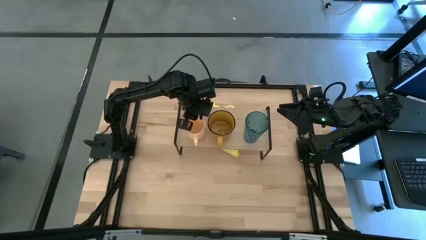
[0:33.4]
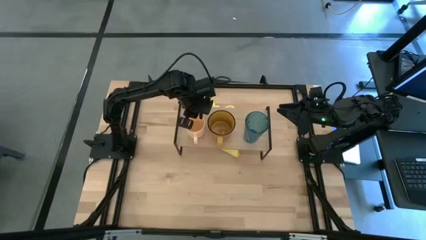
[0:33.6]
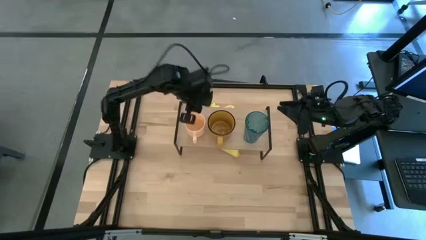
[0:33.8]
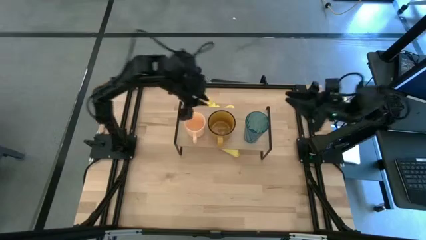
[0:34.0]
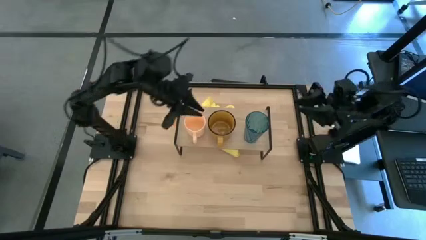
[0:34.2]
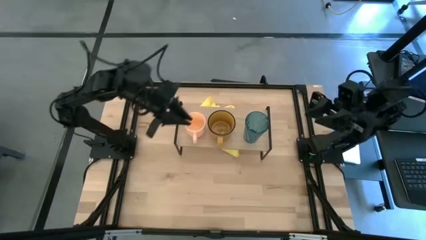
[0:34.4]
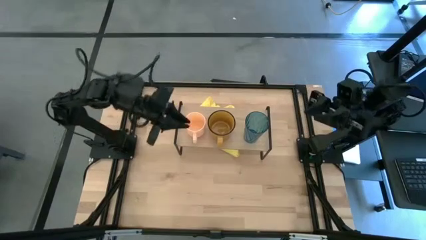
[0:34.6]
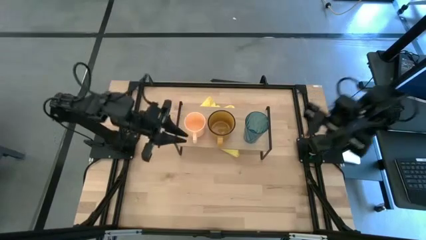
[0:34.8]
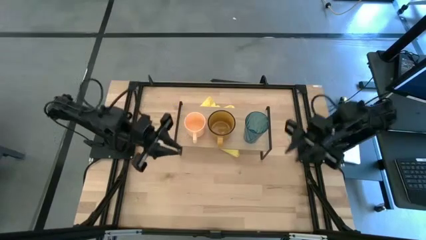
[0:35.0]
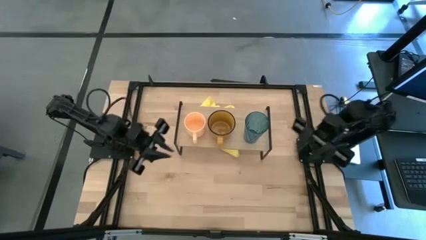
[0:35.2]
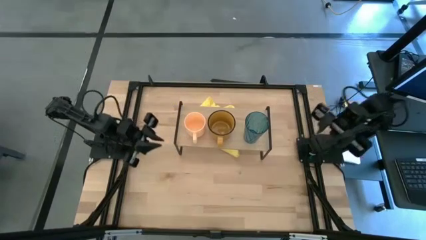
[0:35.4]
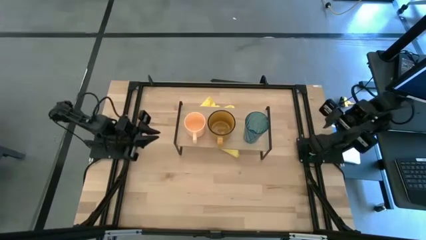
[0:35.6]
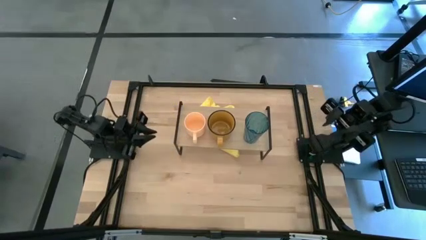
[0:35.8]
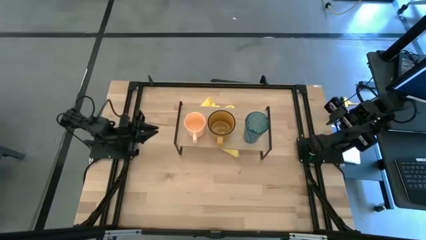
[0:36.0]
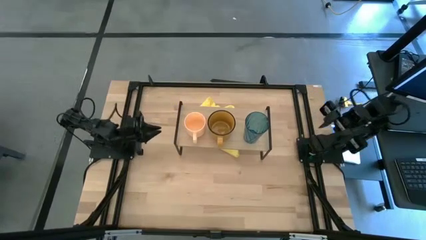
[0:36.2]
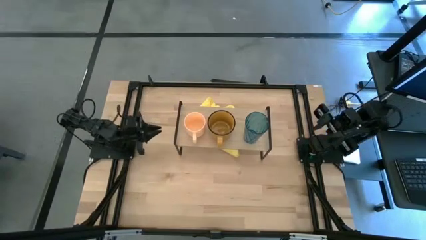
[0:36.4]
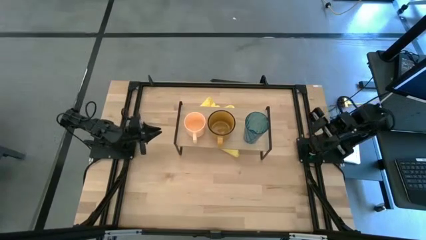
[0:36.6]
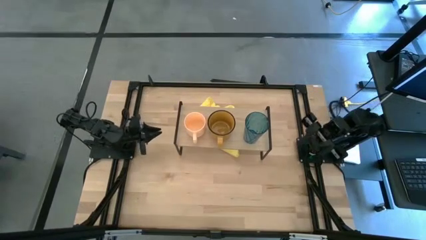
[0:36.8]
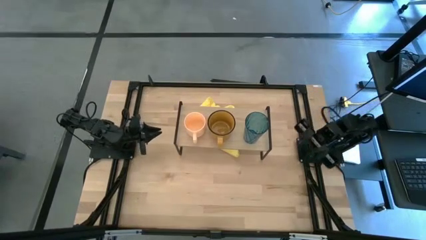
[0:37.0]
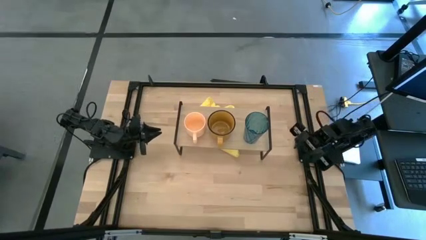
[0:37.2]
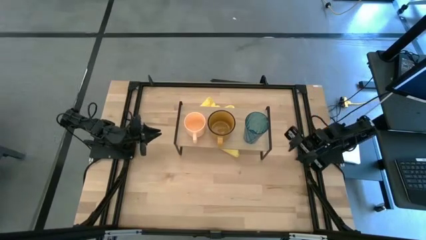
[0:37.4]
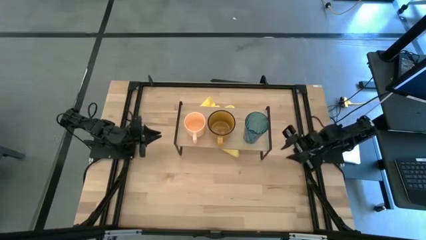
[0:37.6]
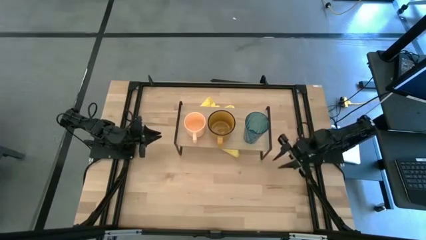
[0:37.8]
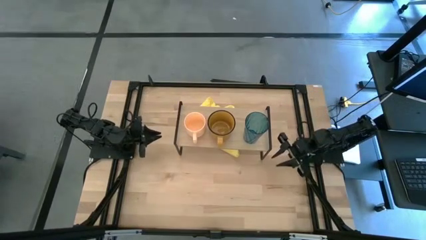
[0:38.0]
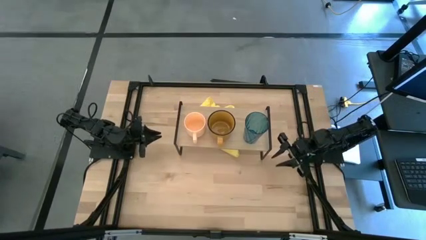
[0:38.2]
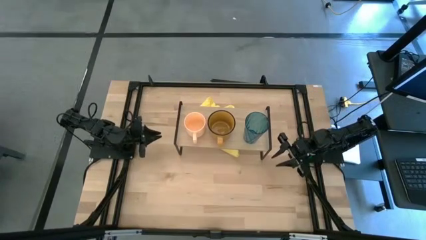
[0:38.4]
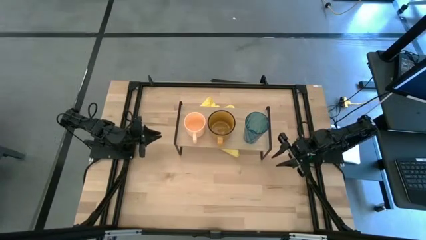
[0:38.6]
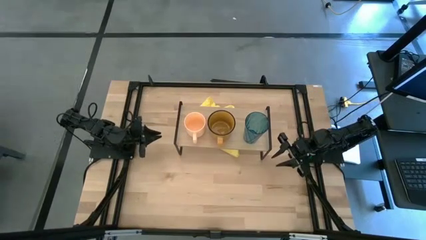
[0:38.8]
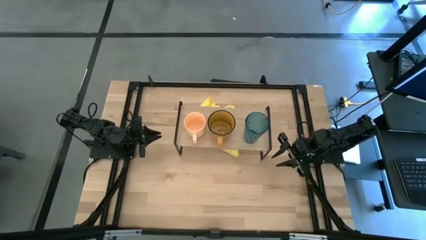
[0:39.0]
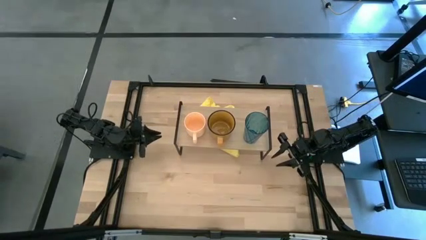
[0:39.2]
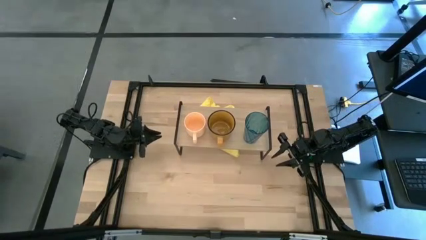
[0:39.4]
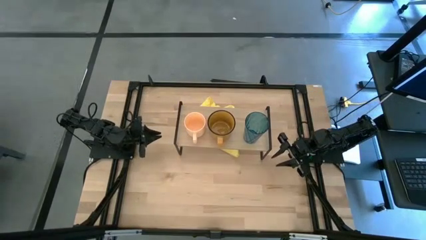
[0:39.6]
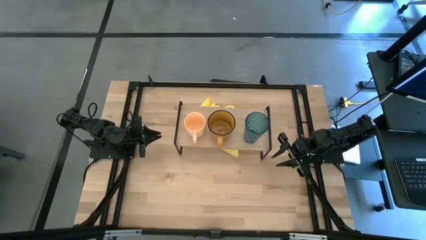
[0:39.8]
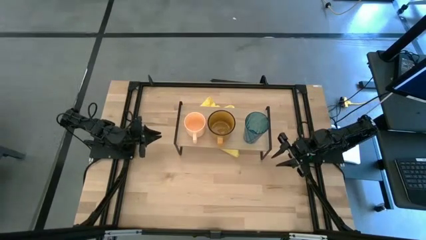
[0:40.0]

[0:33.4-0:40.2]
Task: Stack small to large cups/mugs on shelf
Return to Home Position

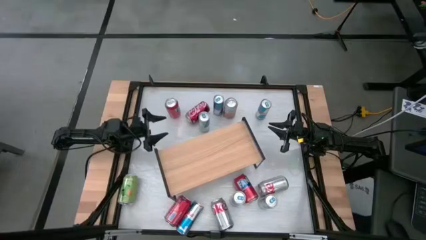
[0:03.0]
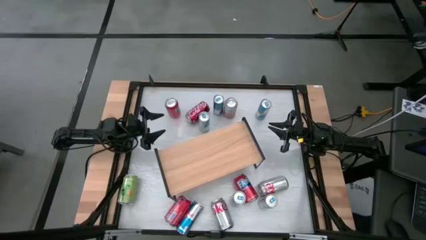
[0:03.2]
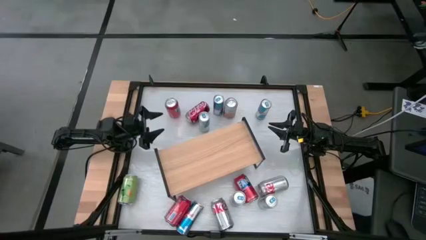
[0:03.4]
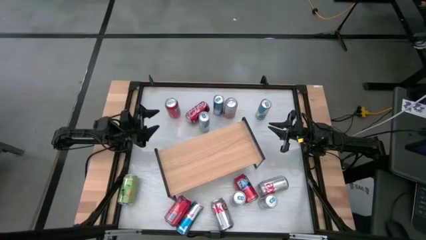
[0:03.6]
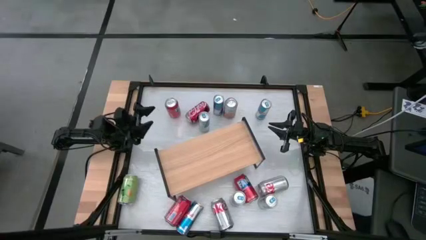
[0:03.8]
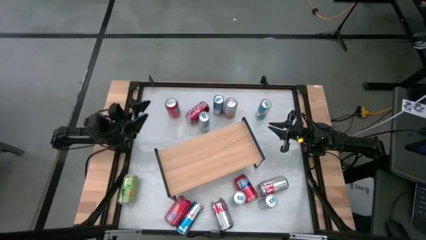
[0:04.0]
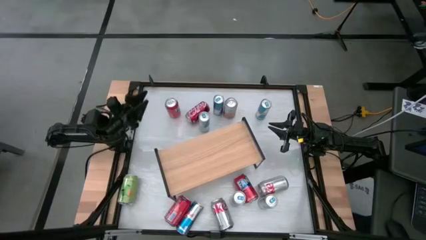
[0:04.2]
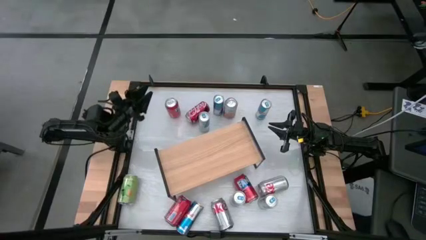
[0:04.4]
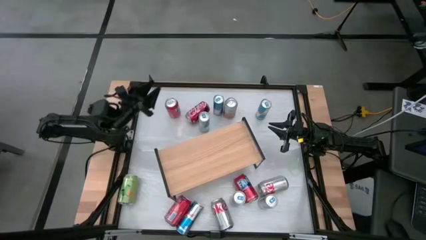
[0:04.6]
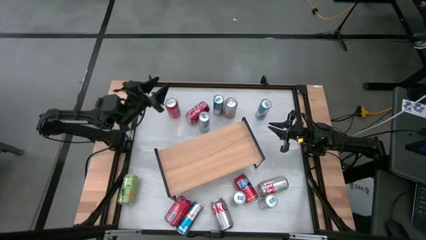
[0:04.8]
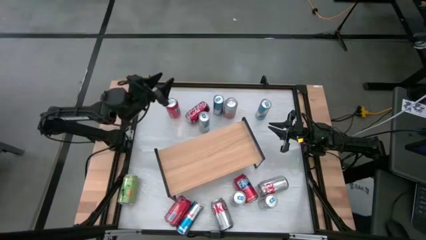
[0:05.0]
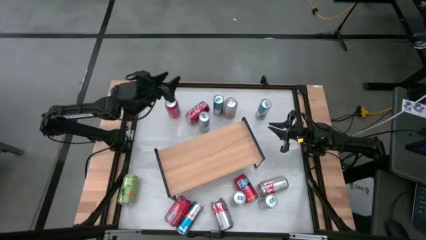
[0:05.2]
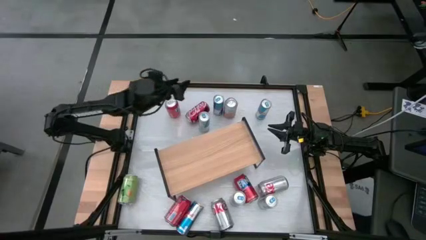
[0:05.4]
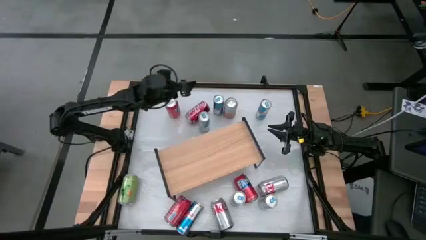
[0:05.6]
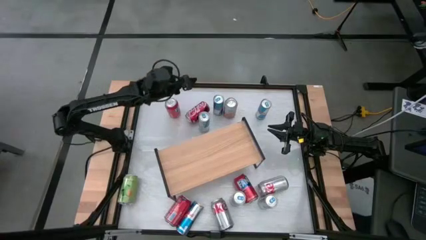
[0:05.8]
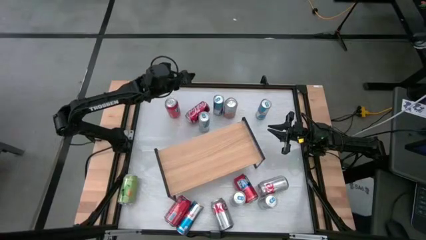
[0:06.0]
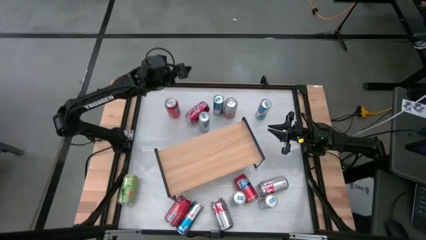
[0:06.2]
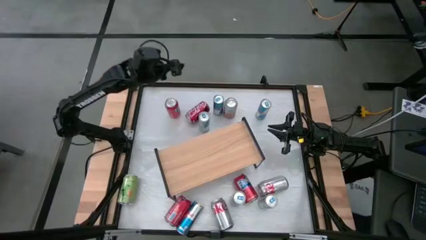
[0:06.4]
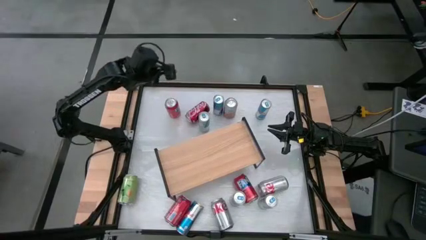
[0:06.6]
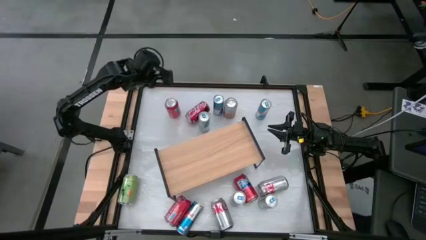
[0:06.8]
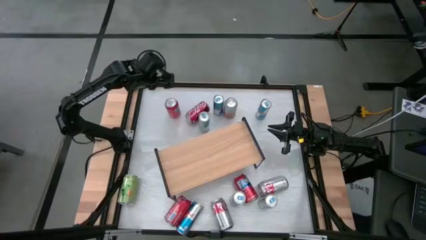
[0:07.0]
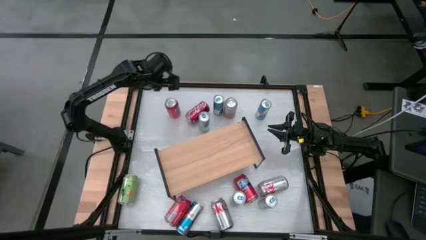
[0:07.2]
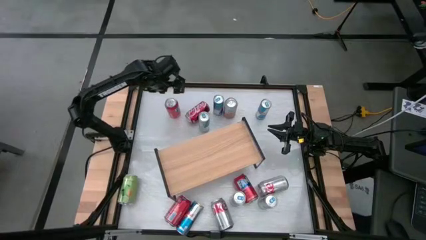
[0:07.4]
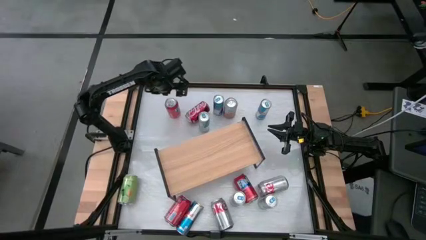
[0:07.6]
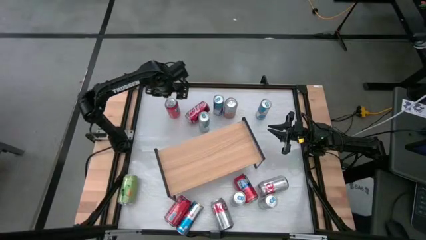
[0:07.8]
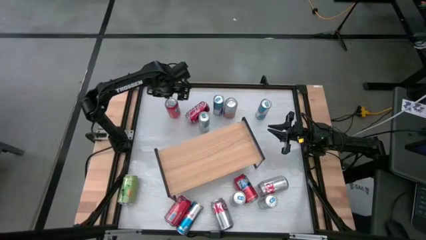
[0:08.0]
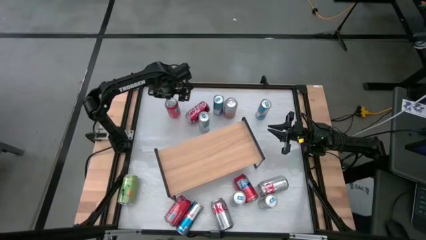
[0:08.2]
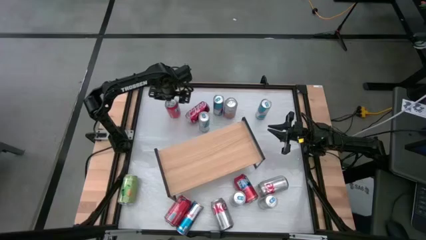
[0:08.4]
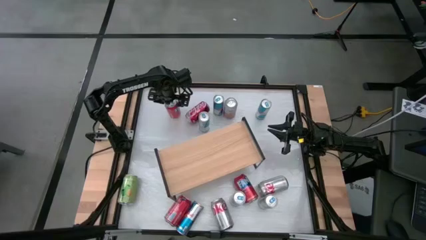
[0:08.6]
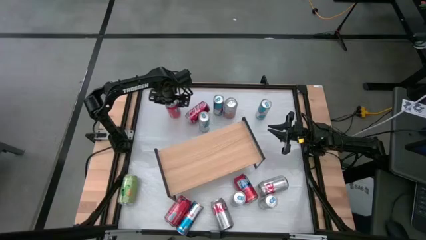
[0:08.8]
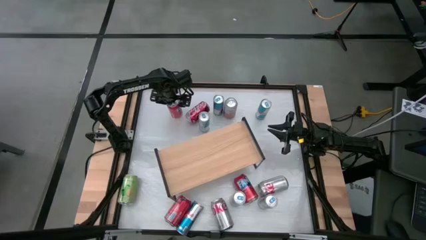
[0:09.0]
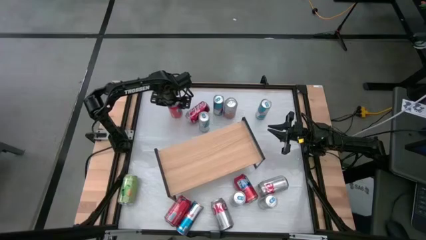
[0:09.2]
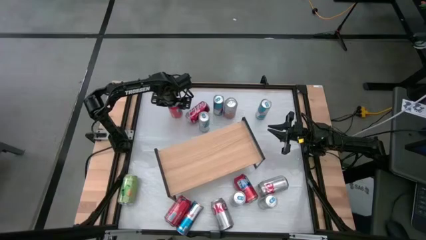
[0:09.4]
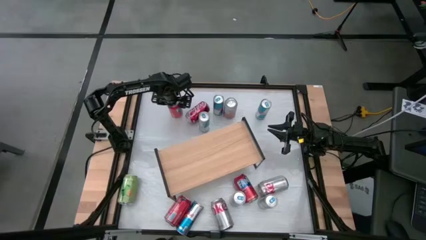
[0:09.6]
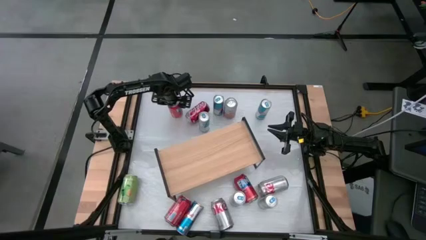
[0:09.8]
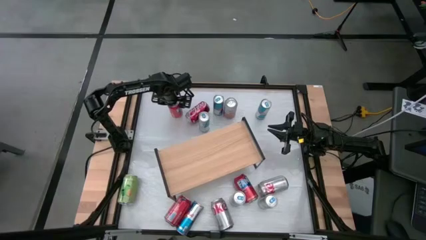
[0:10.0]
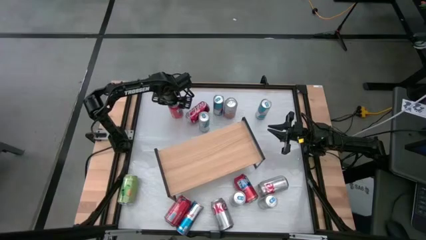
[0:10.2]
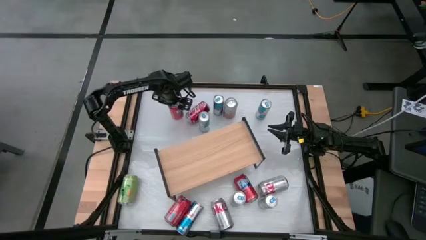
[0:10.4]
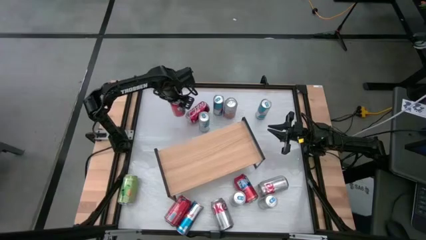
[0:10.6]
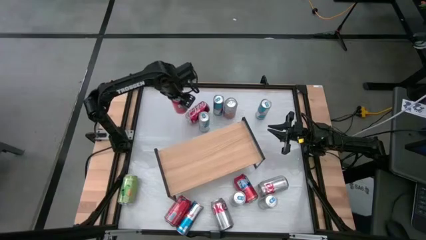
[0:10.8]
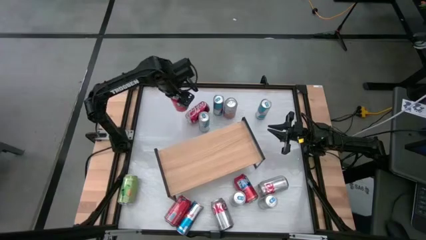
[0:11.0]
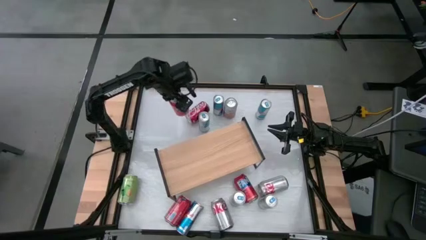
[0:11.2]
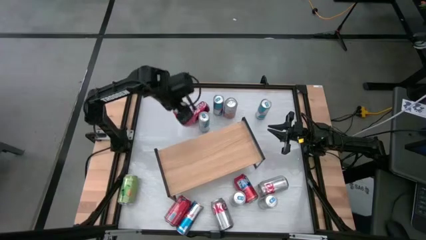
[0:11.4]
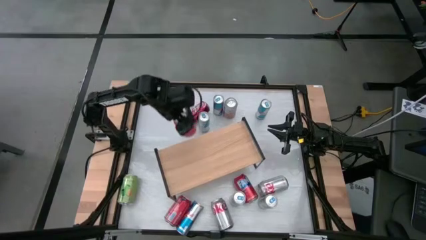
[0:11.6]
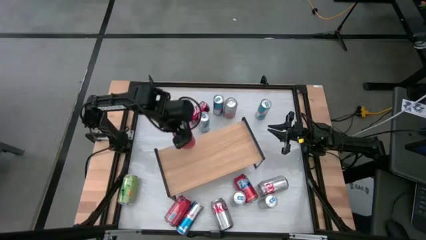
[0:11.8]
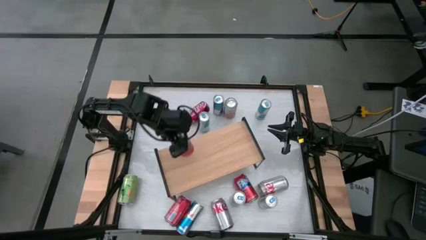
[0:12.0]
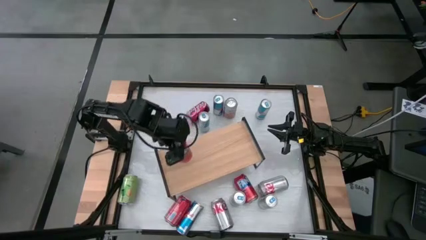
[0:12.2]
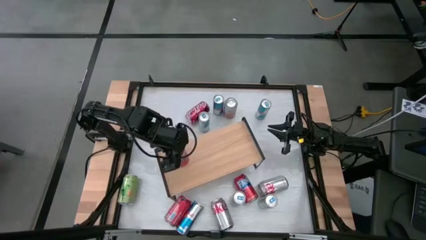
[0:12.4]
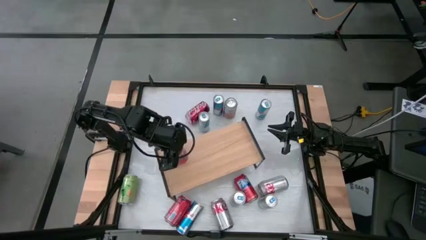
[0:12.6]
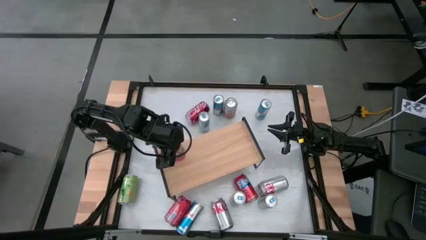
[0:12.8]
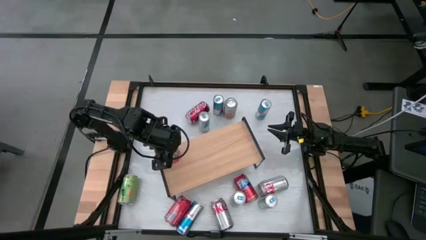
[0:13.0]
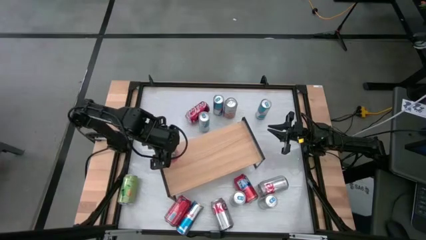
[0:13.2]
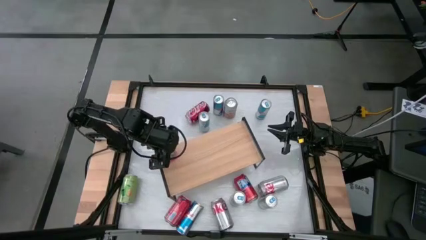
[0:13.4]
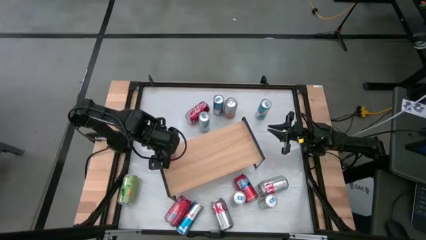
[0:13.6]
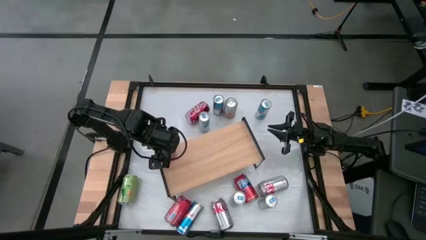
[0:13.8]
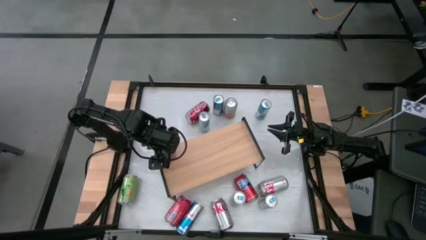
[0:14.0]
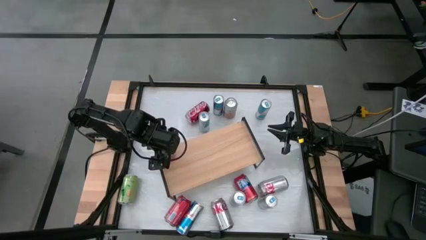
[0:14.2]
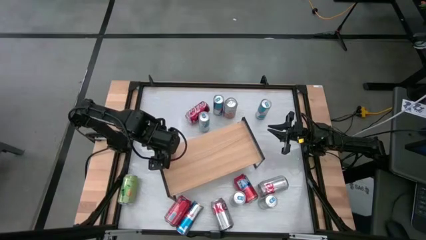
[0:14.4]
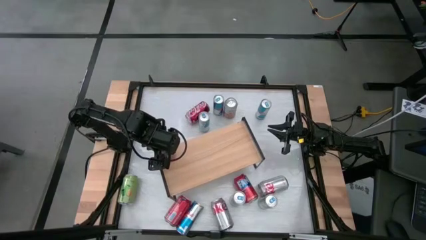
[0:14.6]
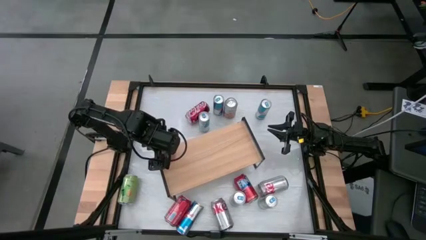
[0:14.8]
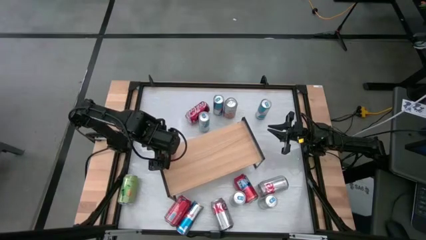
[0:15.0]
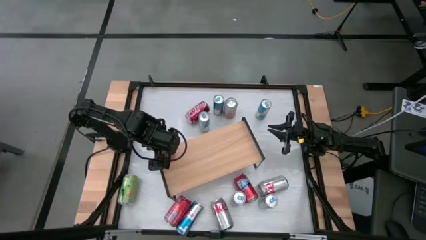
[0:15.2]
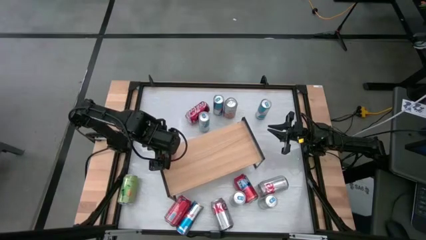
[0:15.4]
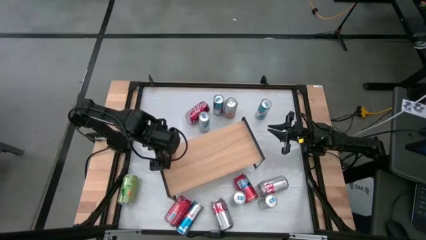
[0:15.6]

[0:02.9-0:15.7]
Task: Place canned beverage on shelf
Put the red soda can on the shelf
